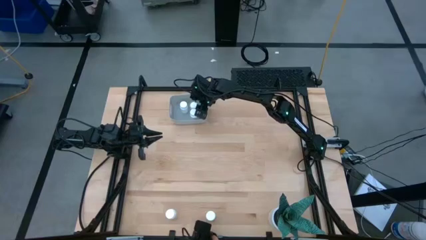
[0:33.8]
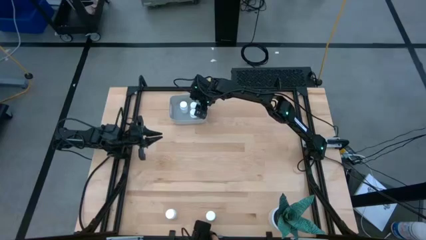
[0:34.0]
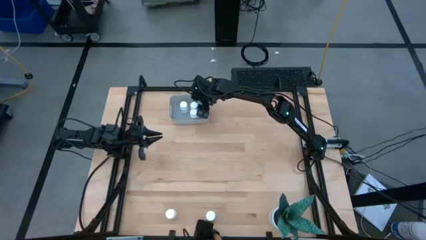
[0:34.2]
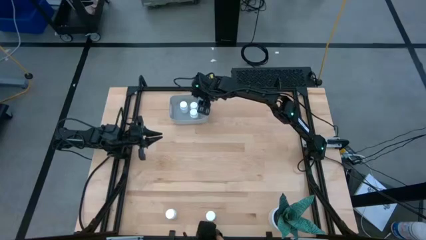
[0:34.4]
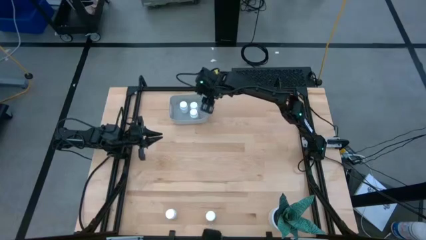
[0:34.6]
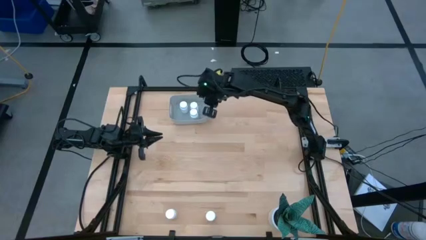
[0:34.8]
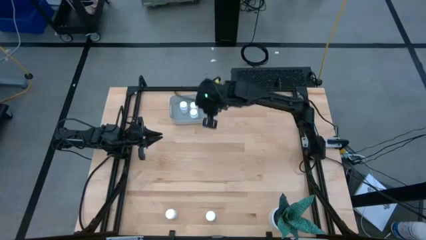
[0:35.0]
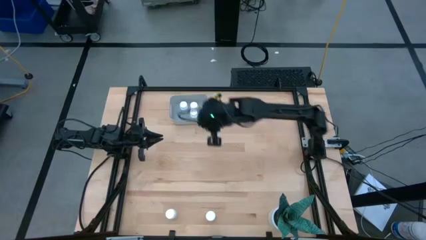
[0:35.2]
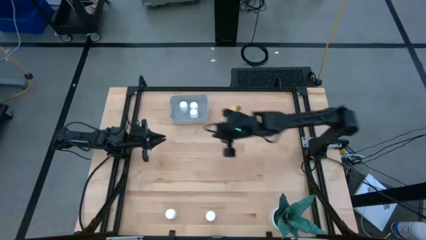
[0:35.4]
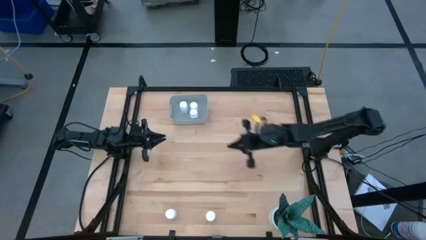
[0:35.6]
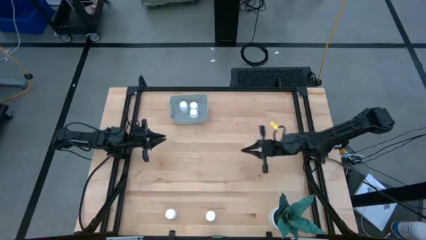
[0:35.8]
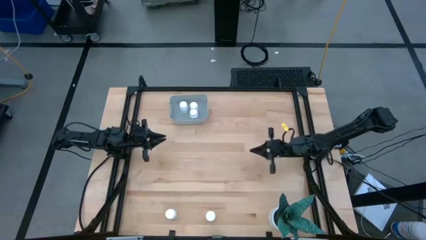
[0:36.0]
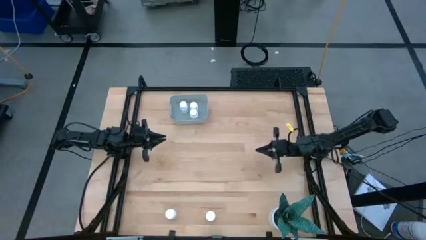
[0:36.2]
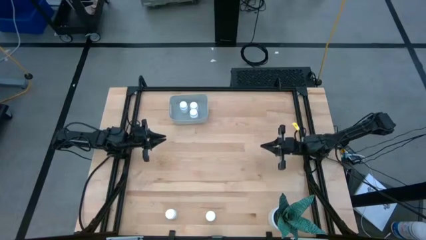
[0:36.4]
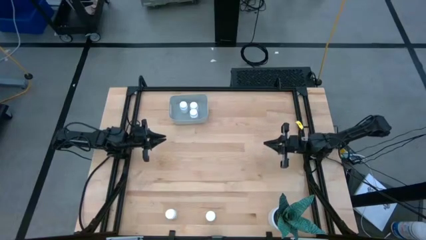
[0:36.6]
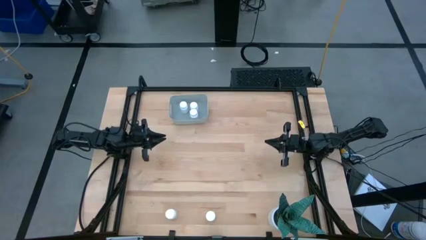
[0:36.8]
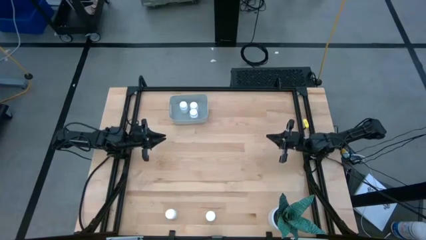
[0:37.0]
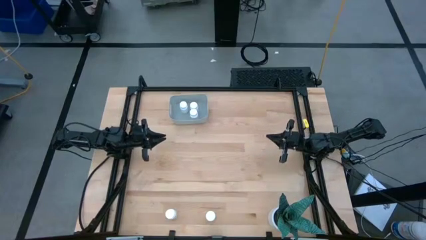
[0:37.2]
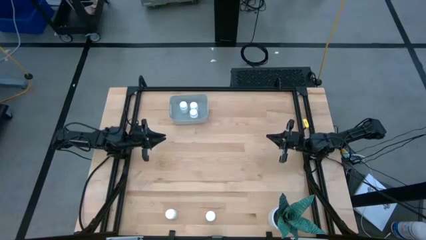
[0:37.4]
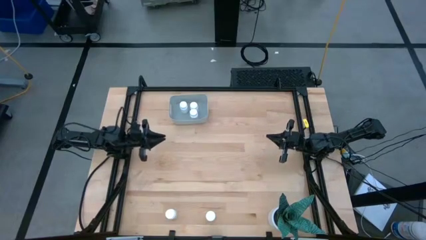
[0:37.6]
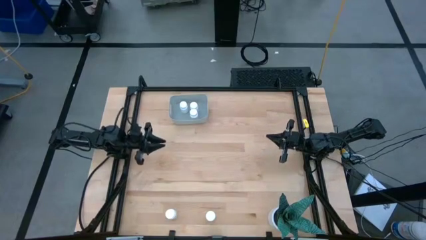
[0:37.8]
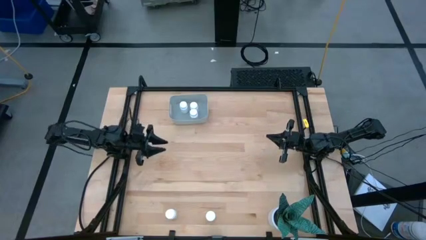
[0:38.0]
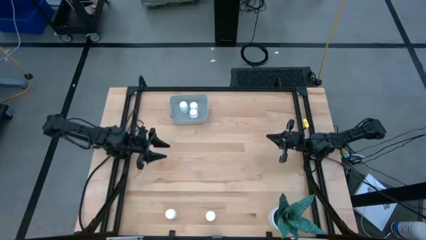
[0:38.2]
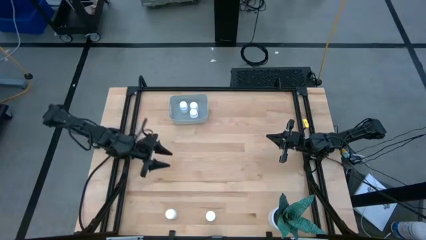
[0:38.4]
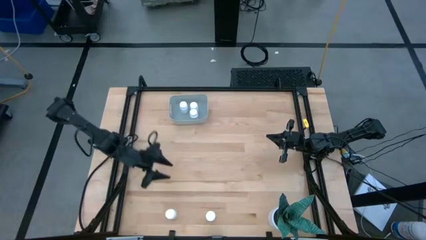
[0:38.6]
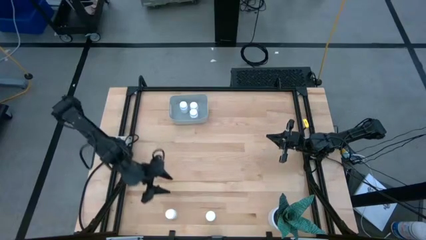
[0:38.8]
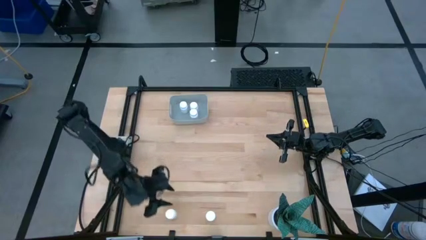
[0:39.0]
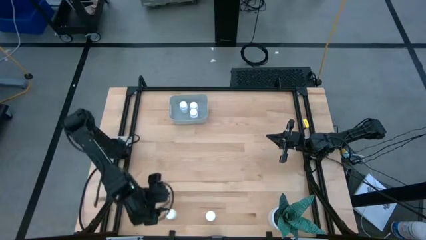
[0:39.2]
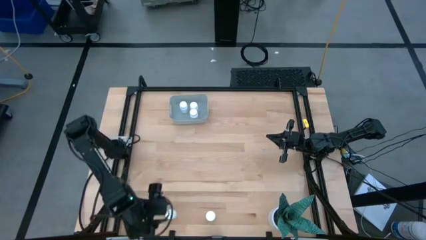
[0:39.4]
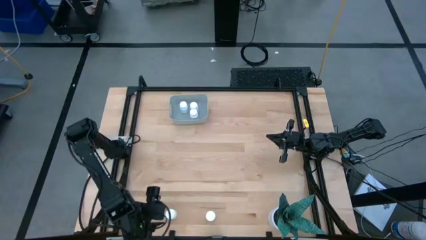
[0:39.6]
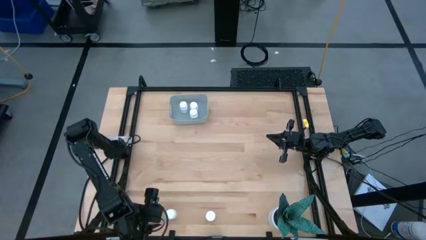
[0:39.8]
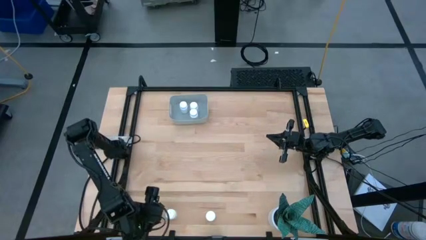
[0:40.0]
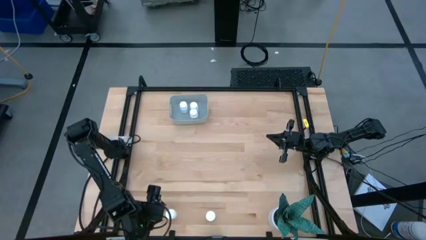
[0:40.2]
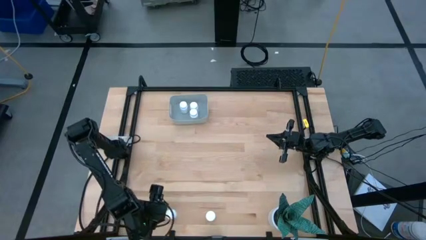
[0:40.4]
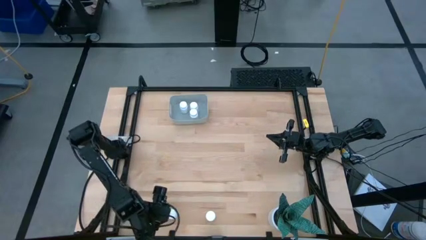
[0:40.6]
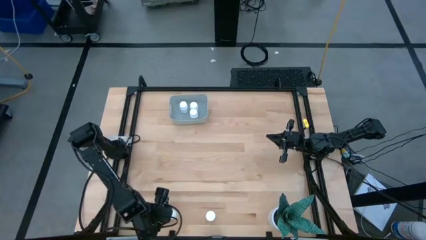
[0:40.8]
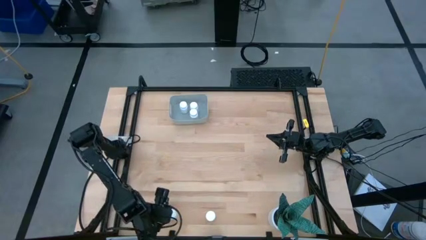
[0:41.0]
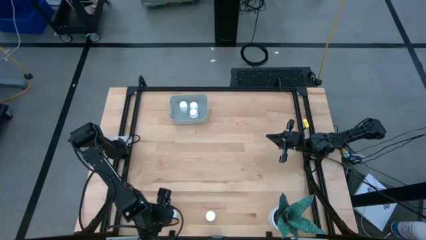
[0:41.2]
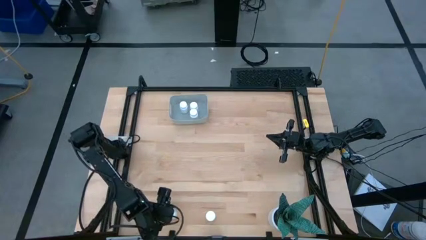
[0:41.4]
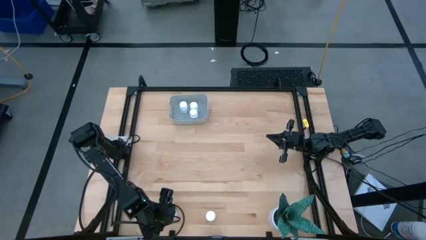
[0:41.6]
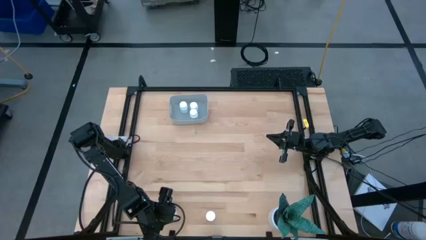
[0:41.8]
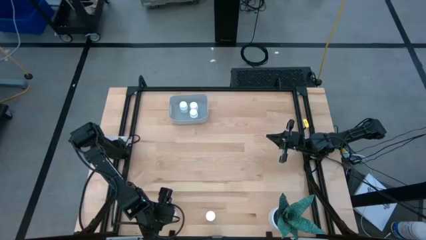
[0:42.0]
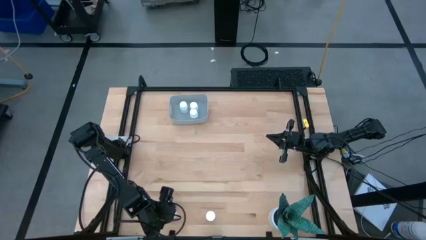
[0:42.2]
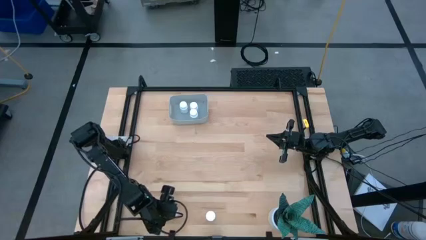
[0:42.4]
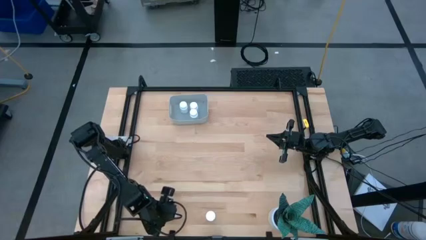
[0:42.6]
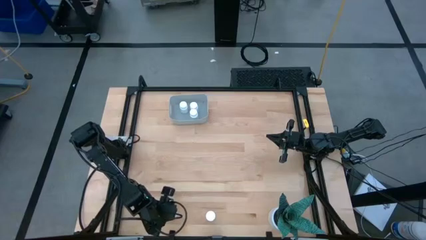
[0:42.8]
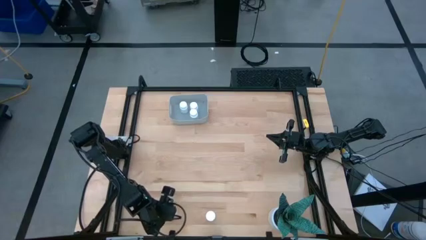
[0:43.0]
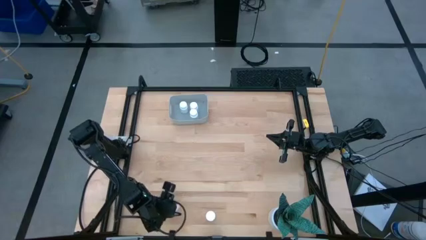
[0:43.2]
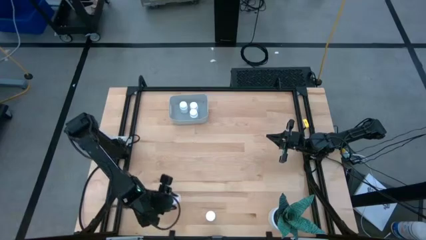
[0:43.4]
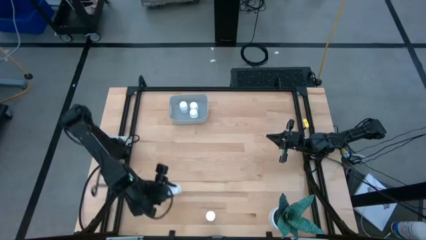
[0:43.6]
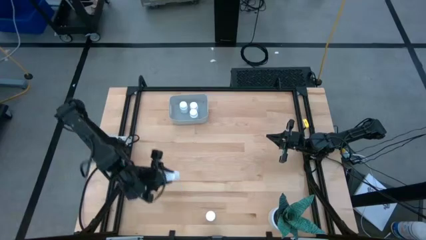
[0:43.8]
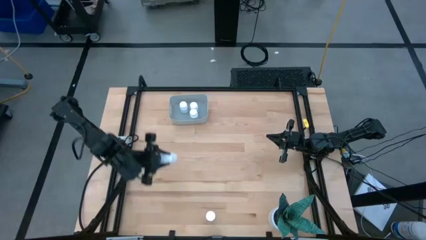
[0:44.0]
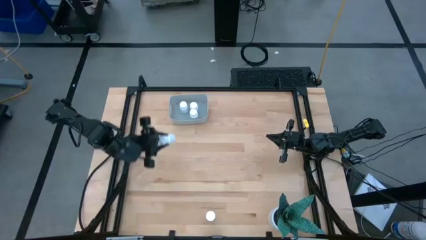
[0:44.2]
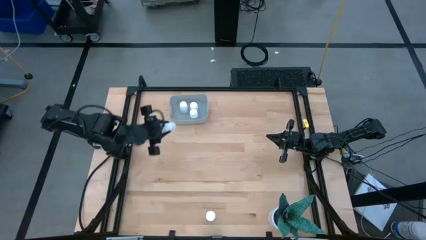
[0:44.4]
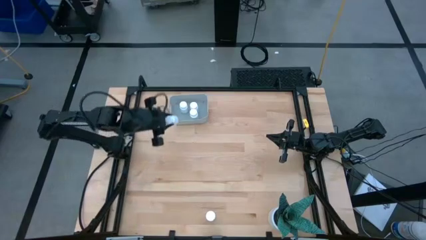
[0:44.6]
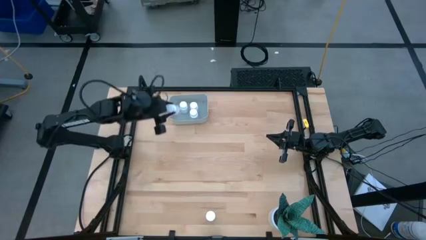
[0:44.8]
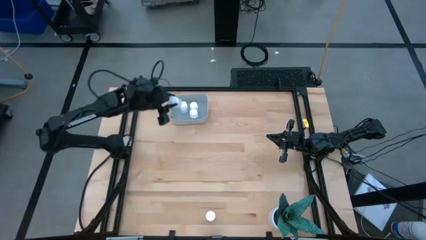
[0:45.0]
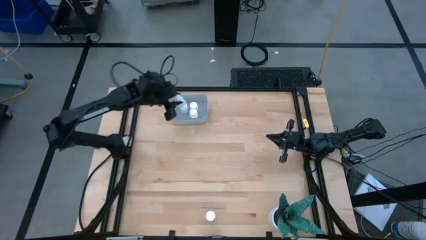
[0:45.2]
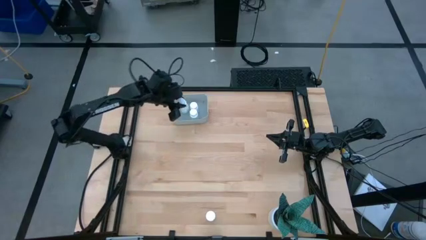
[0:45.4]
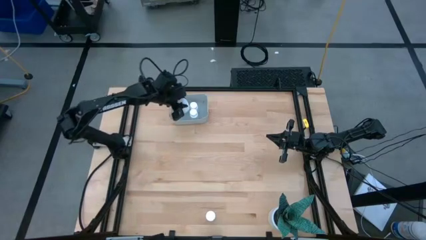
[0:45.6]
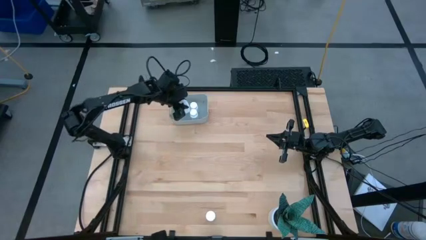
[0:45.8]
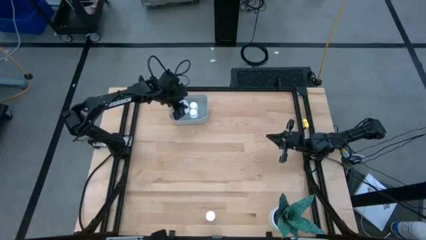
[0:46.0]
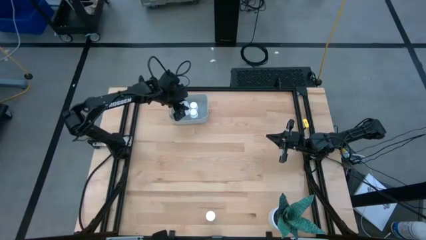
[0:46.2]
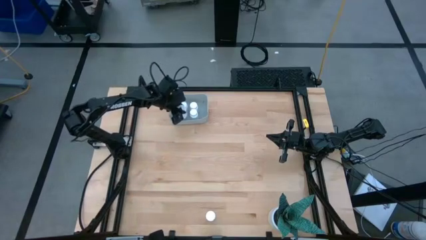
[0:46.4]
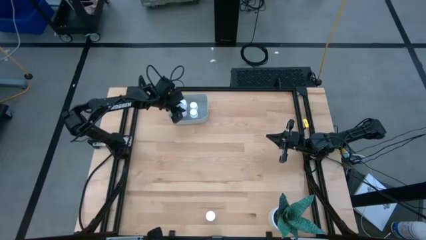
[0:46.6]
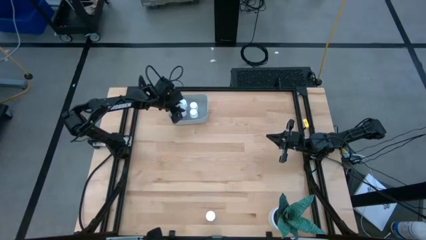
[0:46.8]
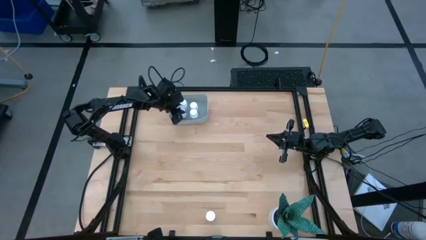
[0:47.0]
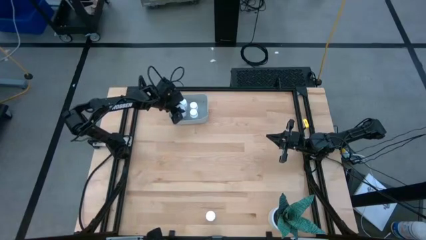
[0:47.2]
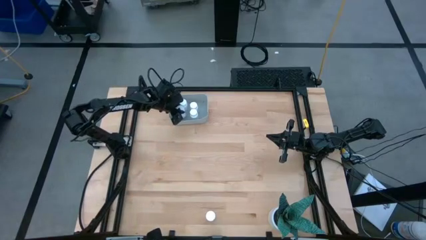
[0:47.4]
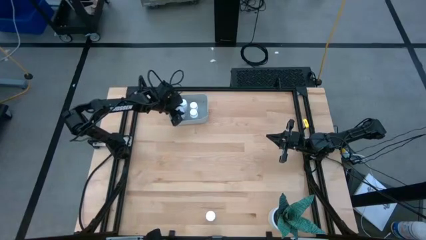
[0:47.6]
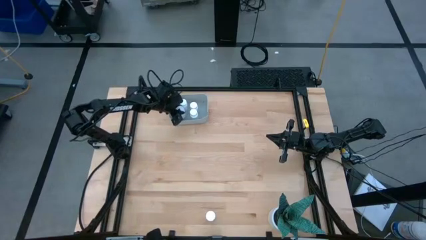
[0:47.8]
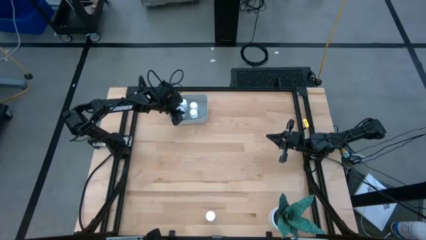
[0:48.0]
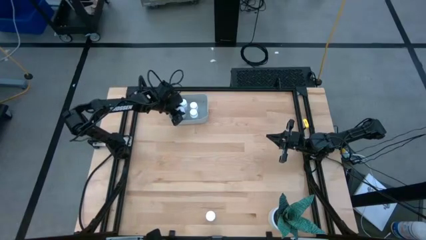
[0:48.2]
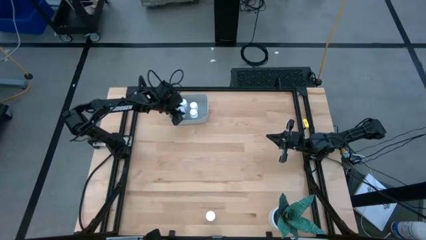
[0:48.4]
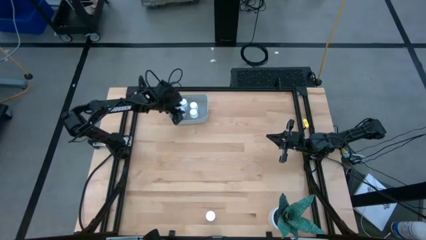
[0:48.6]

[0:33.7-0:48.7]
Task: Pick and place pill bottles into a basket
Put the white medicine bottle into the gray bin
